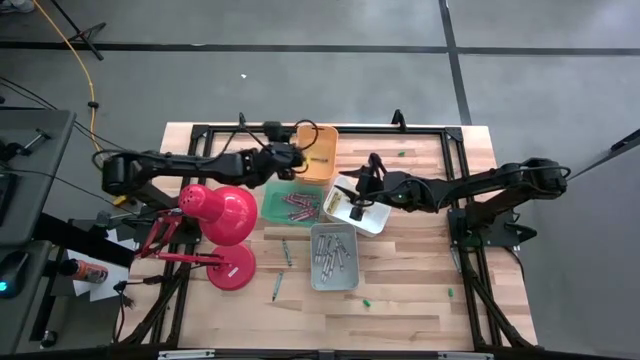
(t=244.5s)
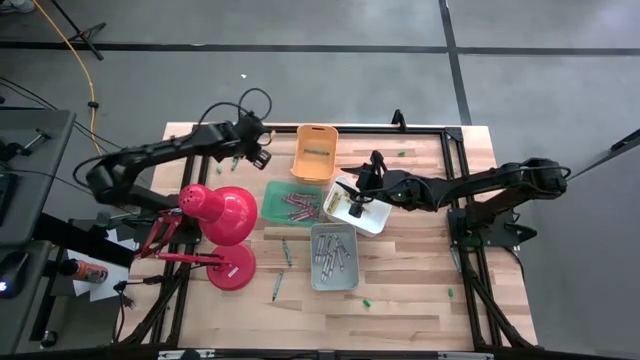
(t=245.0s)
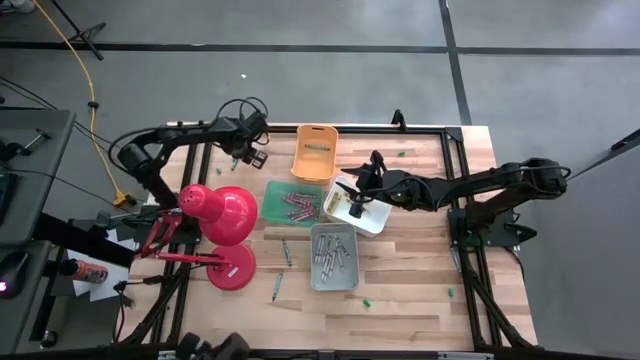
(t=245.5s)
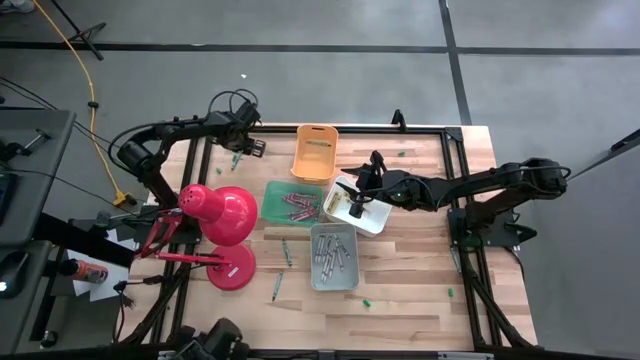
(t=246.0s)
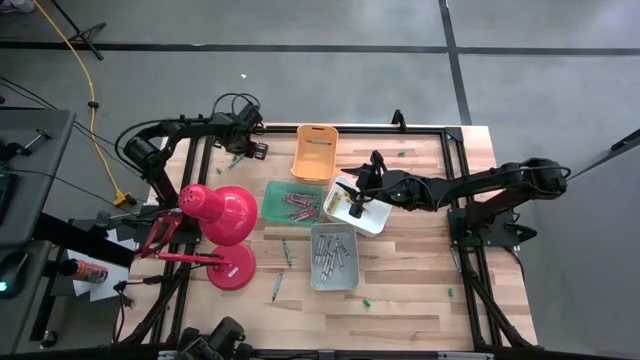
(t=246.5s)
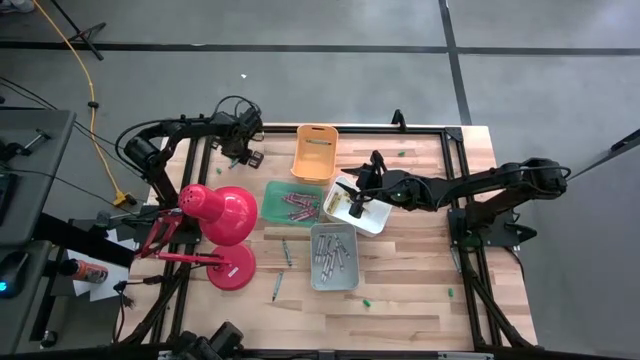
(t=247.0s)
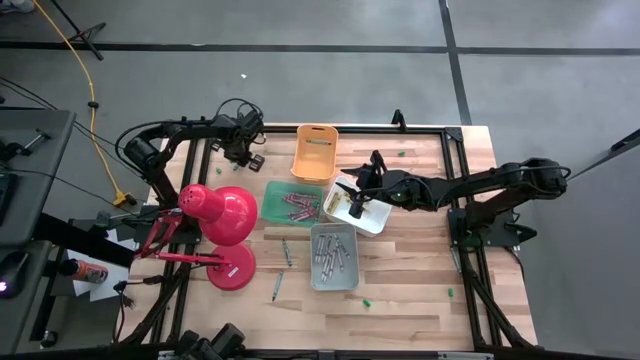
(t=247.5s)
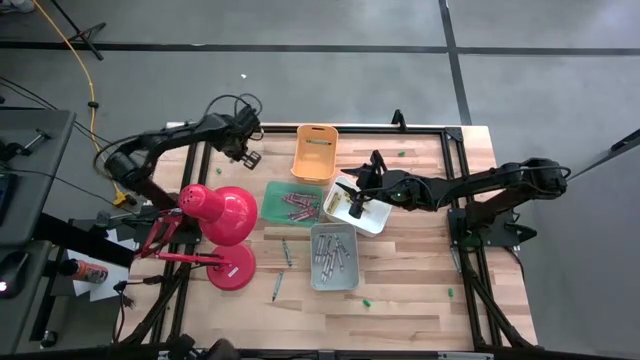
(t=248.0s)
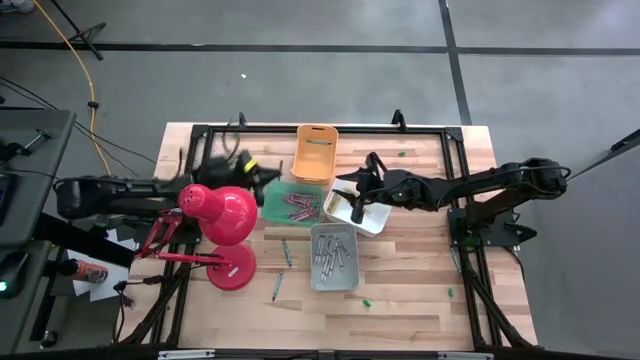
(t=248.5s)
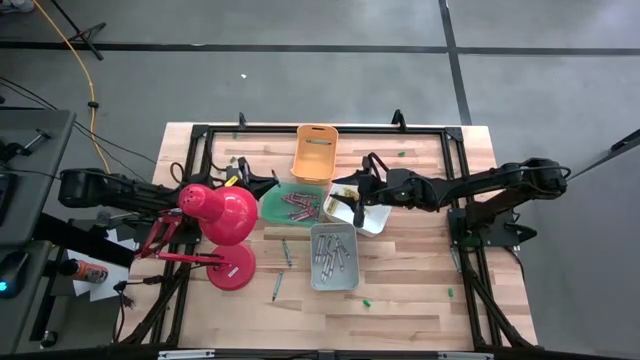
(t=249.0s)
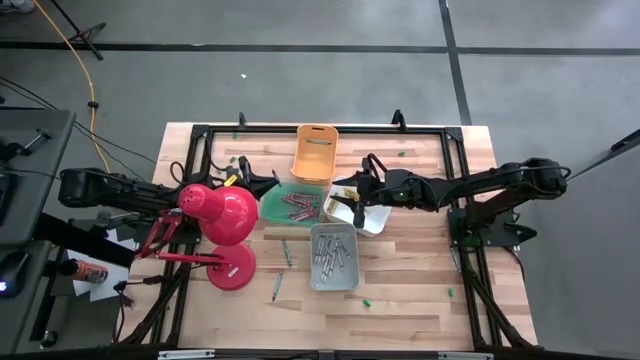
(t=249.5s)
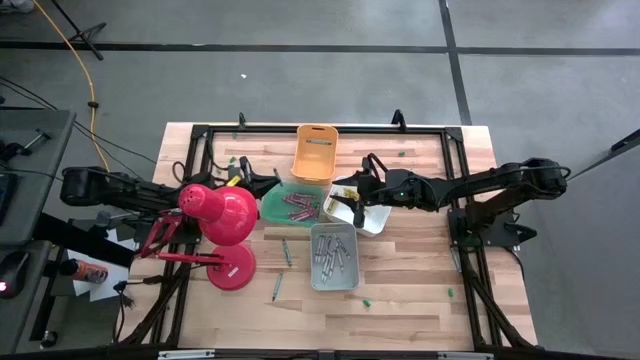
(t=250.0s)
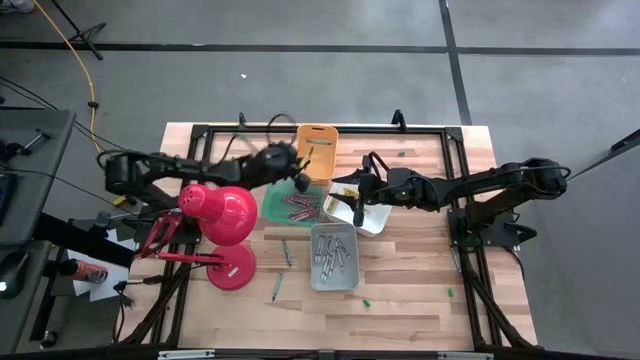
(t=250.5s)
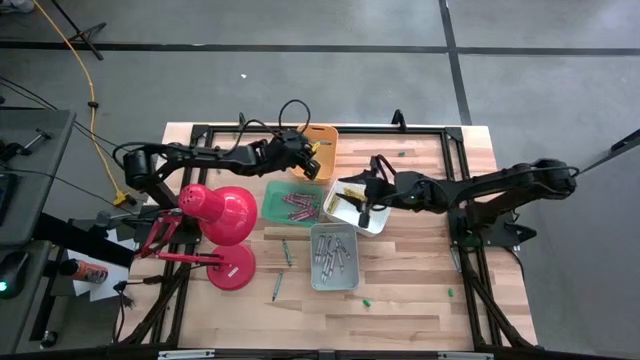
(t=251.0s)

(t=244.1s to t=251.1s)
Task: Sort crayons
Put the blue crayon into the yellow bin

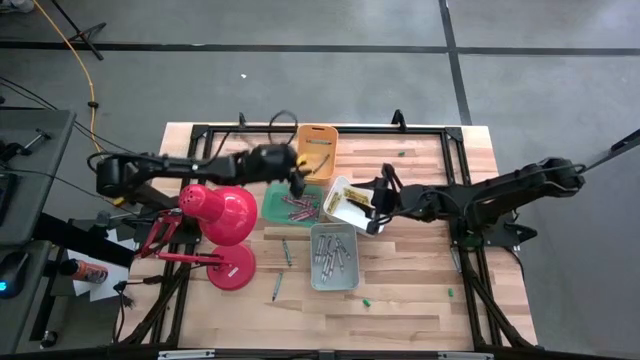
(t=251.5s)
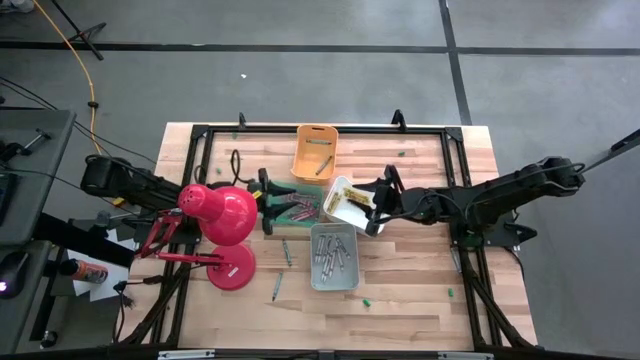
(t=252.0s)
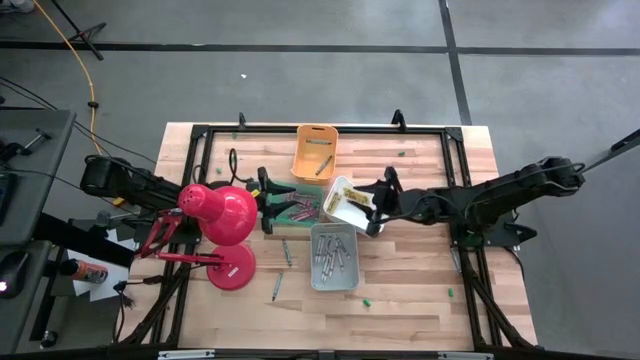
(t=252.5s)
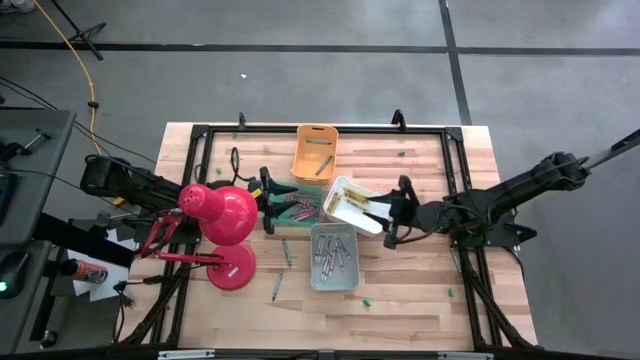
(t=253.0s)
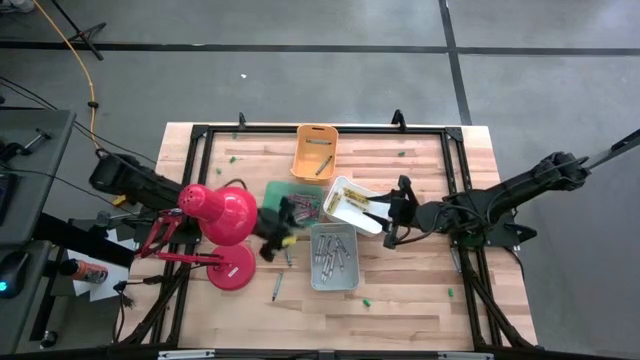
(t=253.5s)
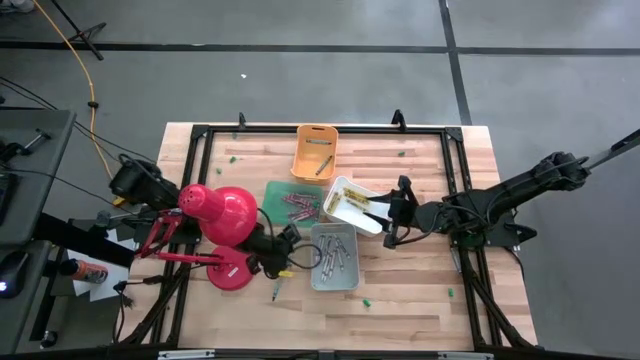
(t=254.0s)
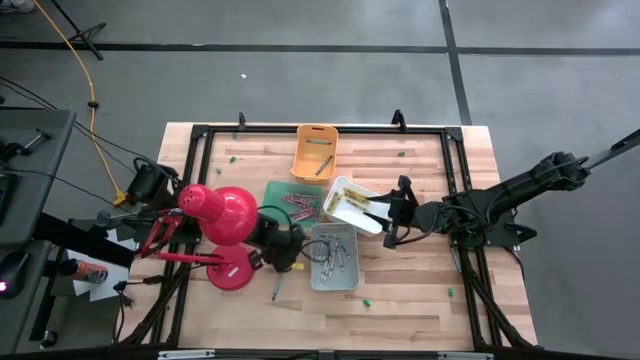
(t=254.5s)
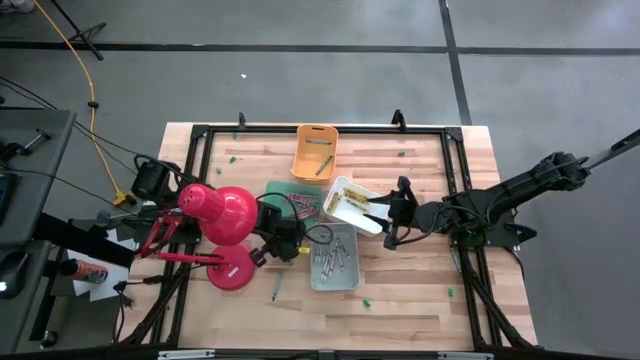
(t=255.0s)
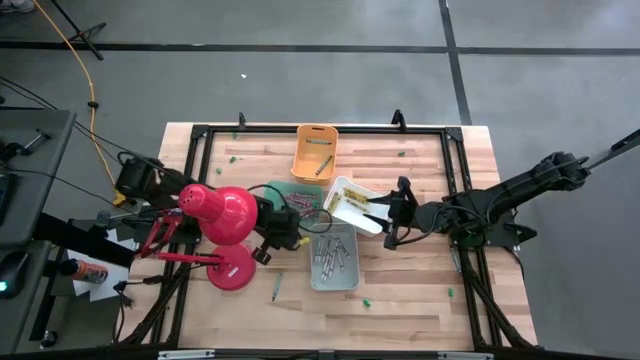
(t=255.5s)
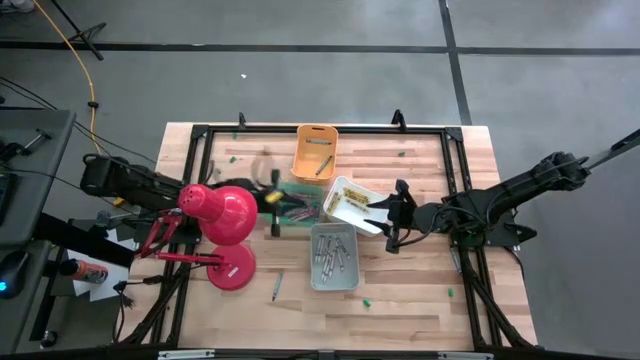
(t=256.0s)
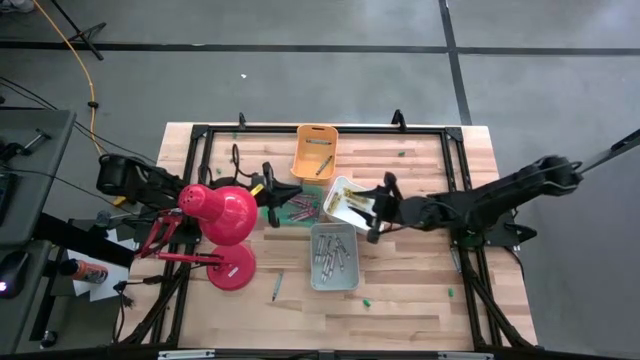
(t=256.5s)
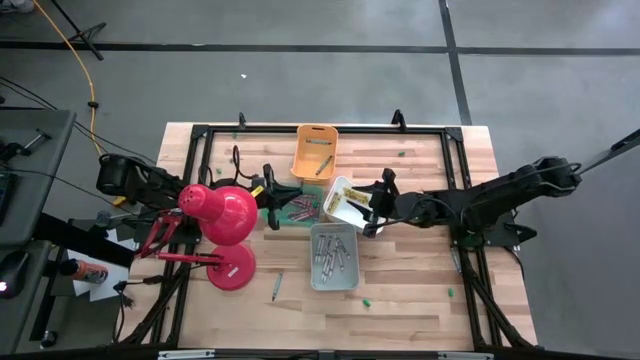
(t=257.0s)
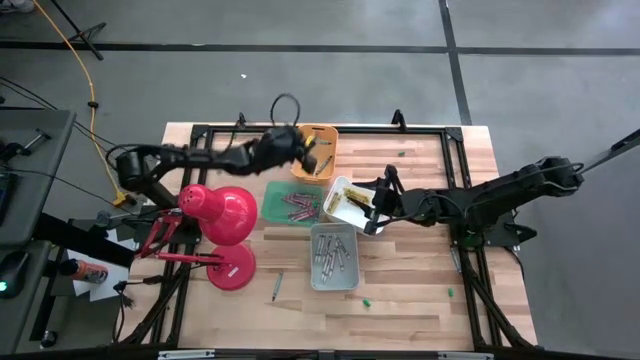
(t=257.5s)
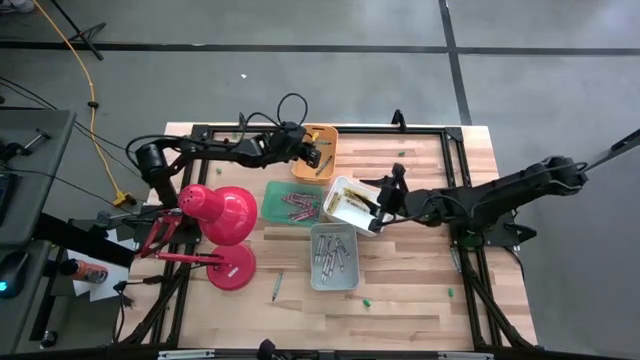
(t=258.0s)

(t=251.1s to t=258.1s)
Put the blue crayon into the yellow bin

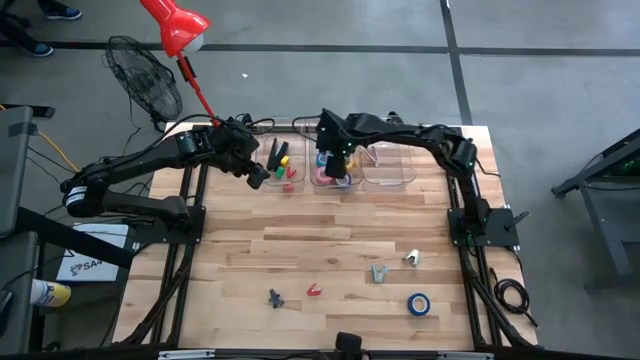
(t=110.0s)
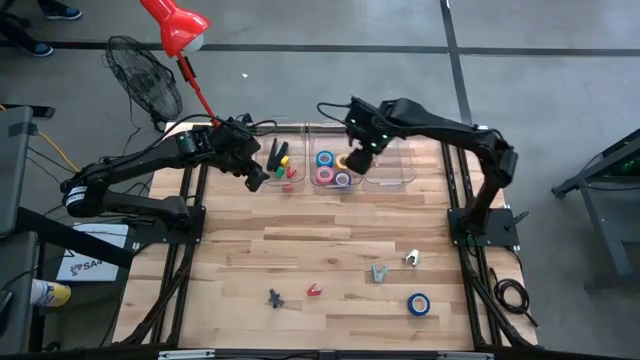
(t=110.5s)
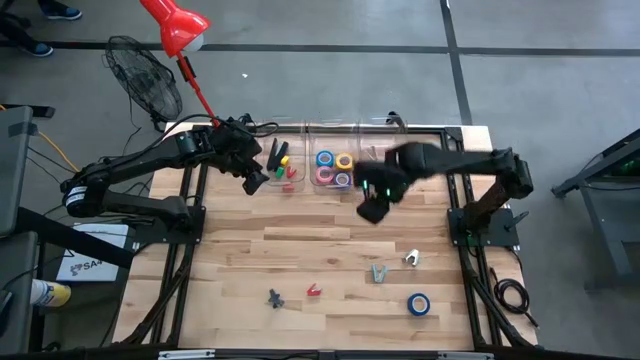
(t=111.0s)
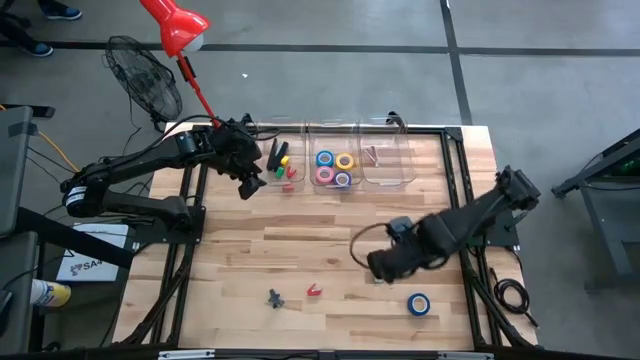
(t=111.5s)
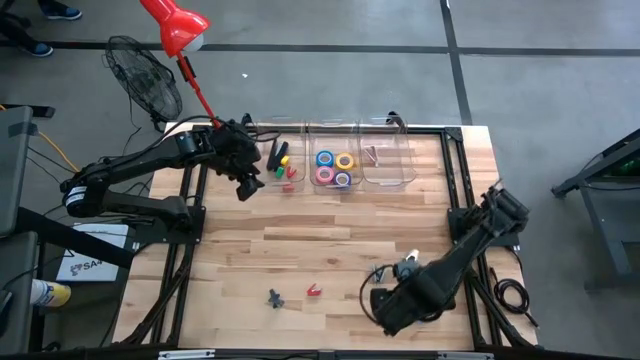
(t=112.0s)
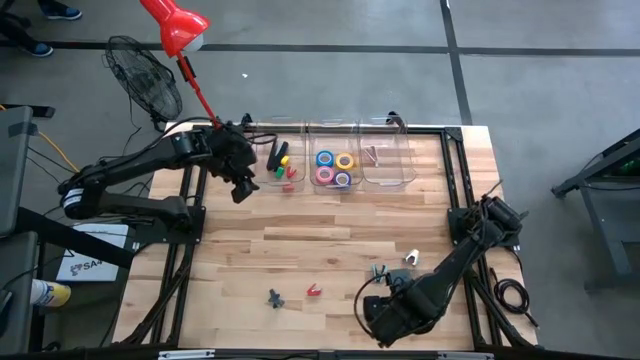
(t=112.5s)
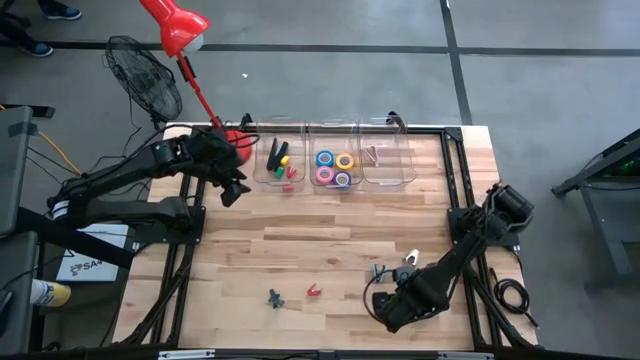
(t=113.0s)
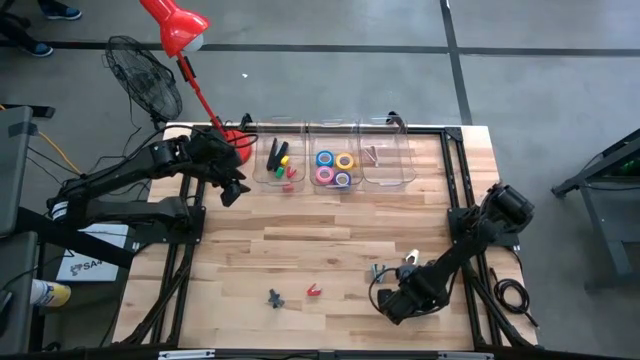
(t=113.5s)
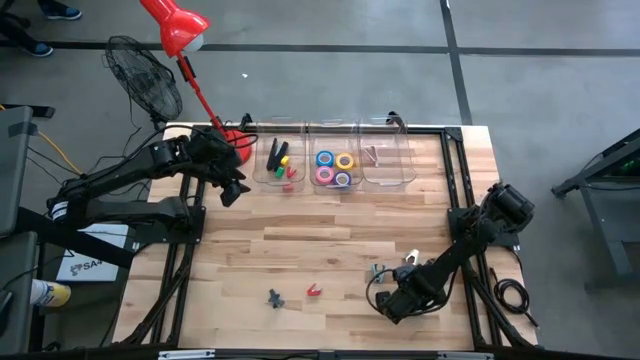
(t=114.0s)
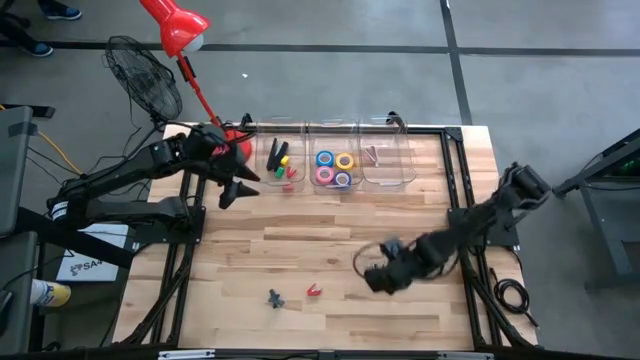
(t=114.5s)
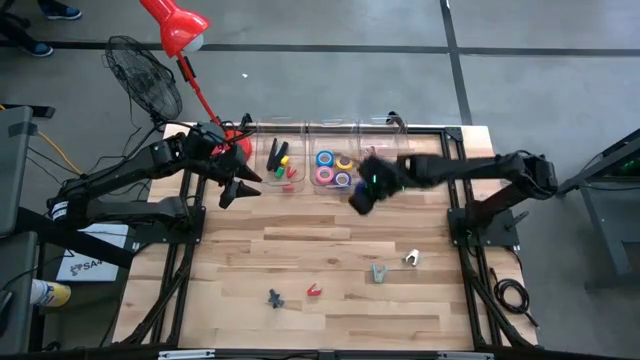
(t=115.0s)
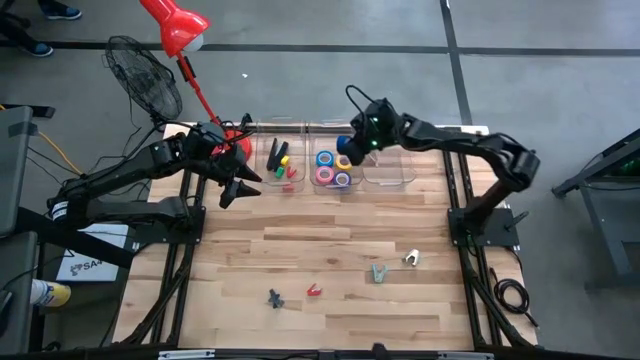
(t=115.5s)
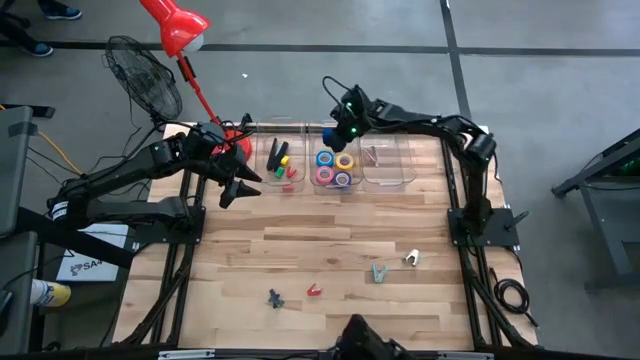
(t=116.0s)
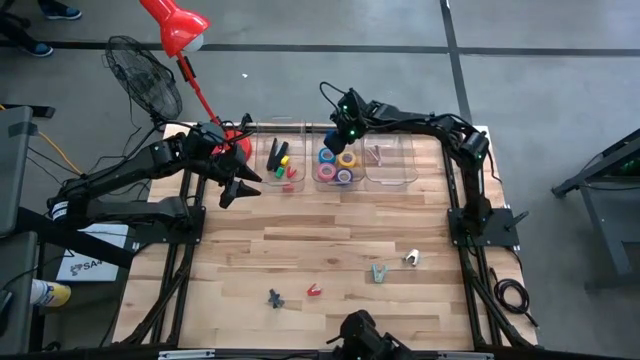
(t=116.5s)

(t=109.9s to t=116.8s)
Task: Pick and place Stapler, Stapler remover, tape
Put the blue tape into the middle transparent bin

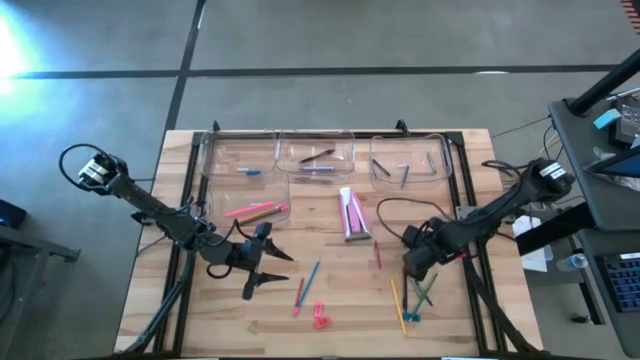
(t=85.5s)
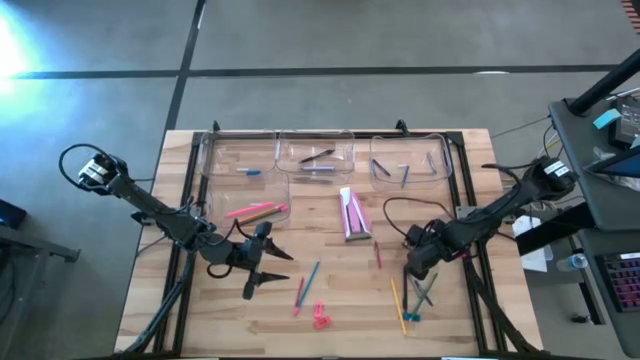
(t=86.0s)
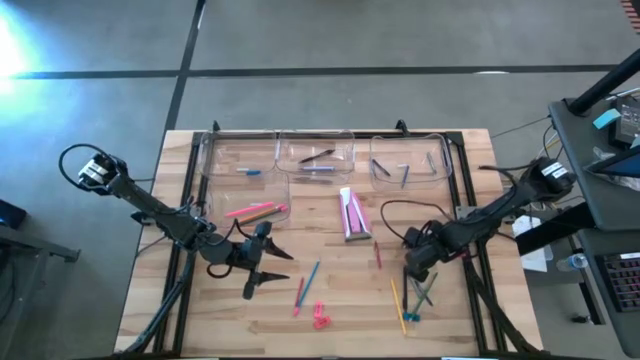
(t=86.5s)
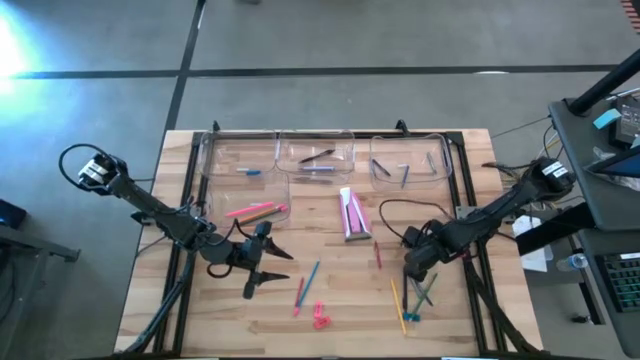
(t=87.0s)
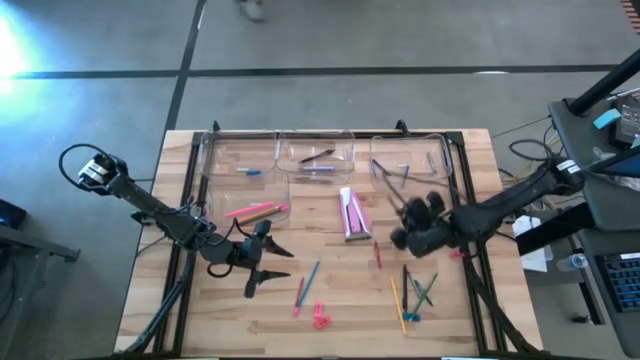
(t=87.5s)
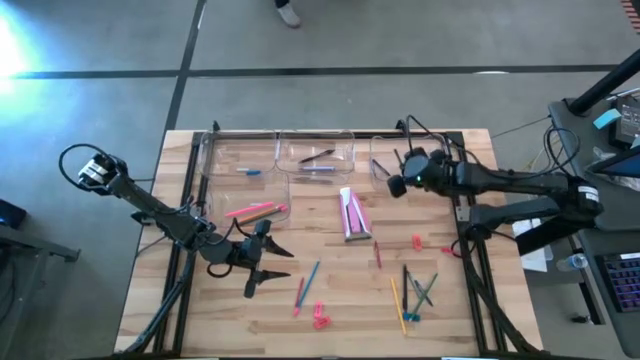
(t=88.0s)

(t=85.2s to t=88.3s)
Task: Sort crayons/erasers/pens/pencils in bins
Put the green crayon into the top right transparent bin
